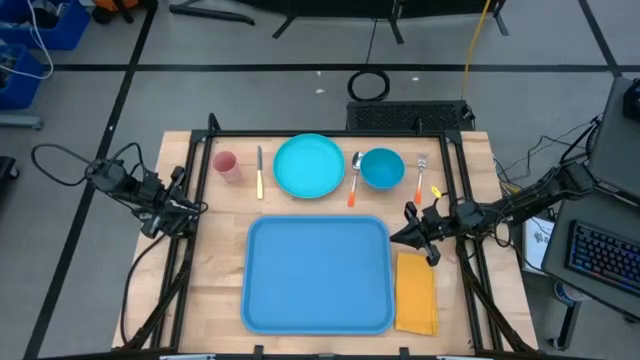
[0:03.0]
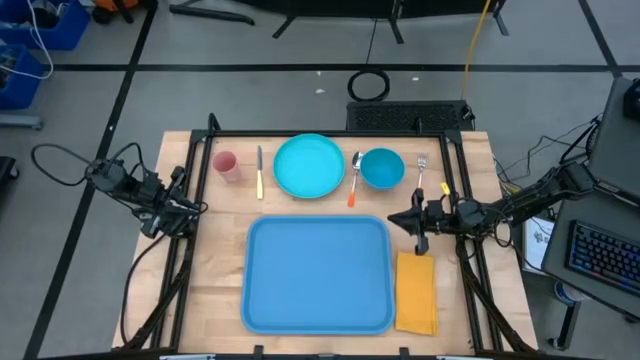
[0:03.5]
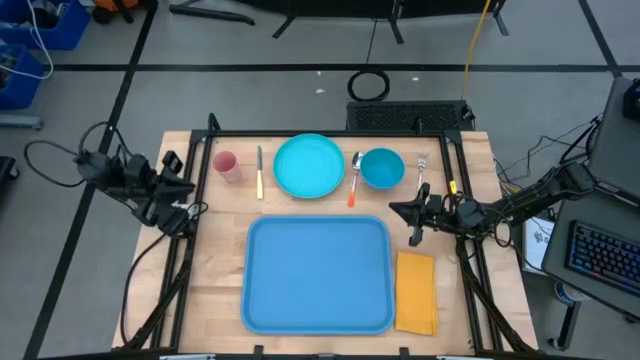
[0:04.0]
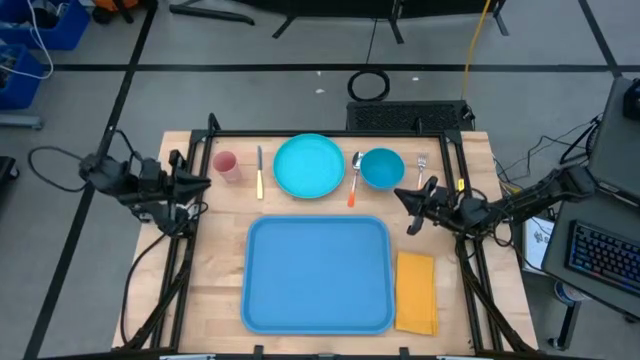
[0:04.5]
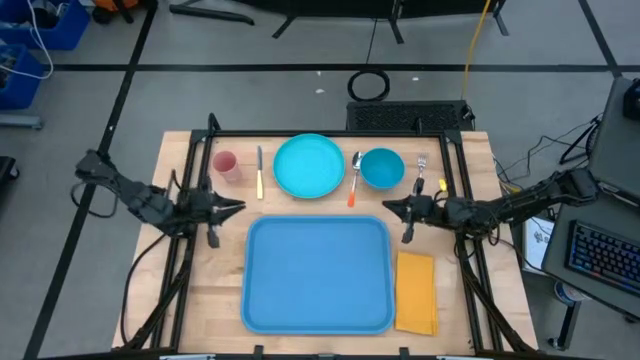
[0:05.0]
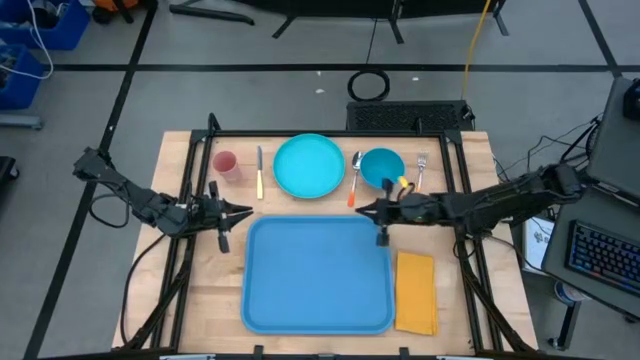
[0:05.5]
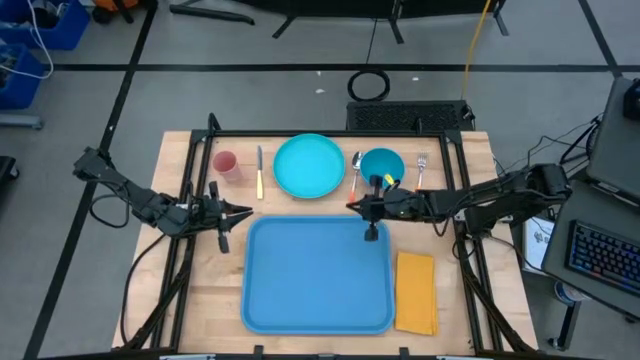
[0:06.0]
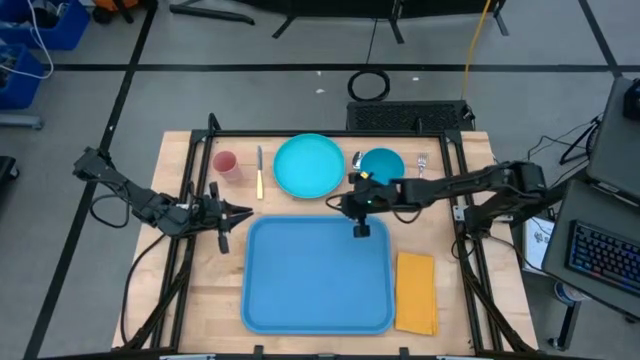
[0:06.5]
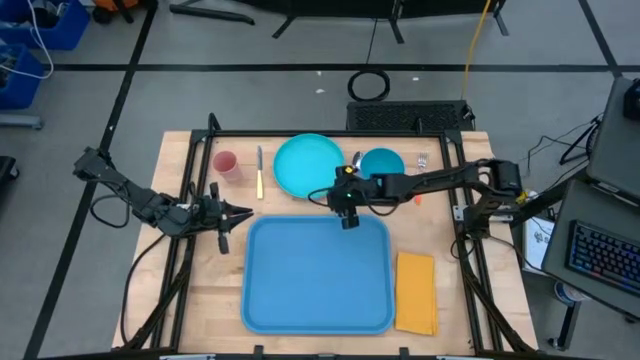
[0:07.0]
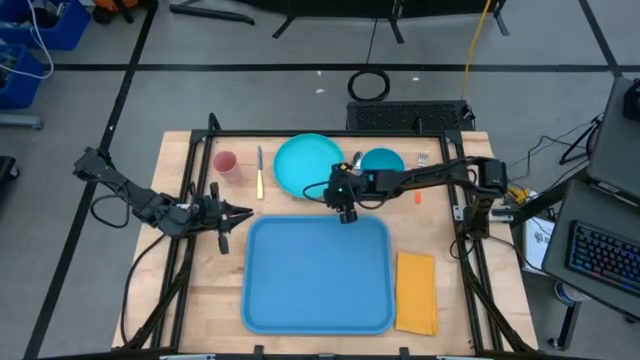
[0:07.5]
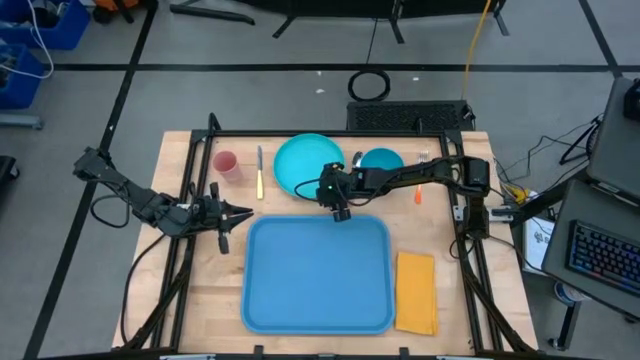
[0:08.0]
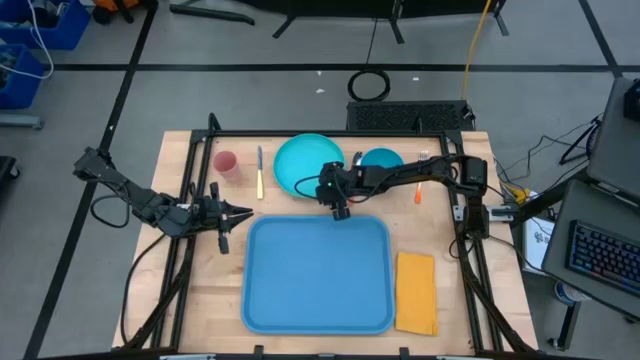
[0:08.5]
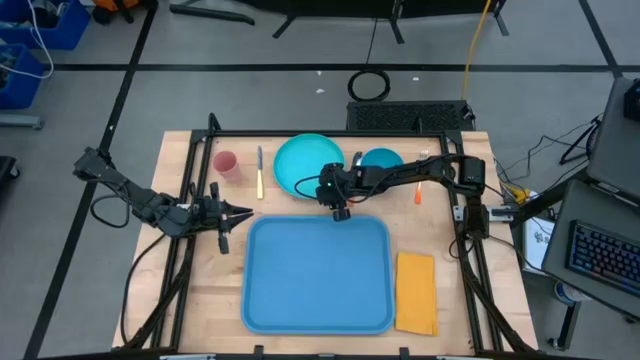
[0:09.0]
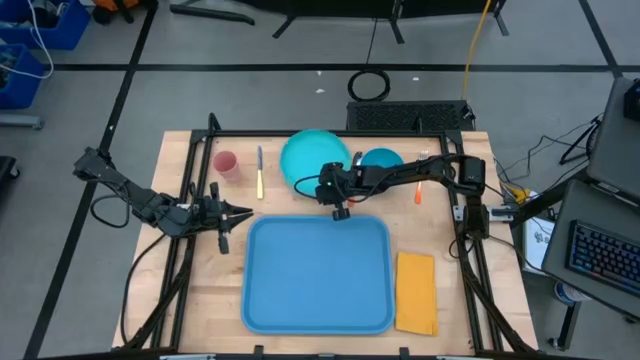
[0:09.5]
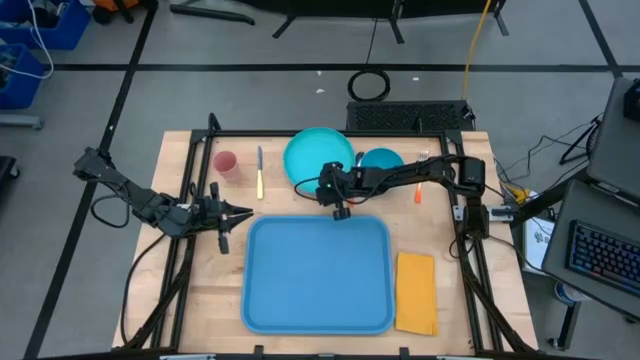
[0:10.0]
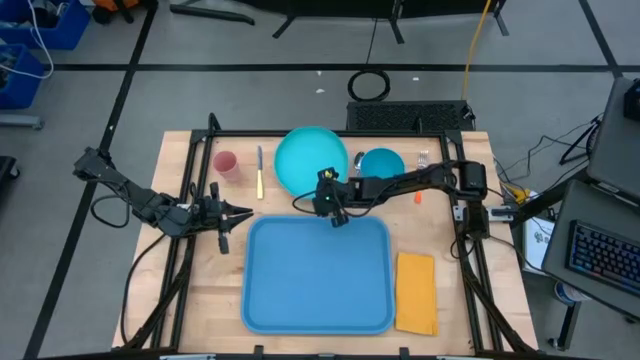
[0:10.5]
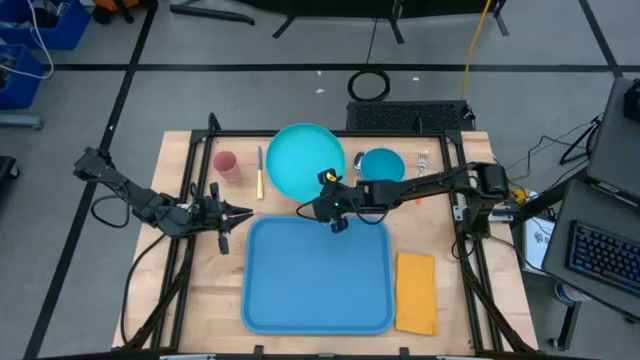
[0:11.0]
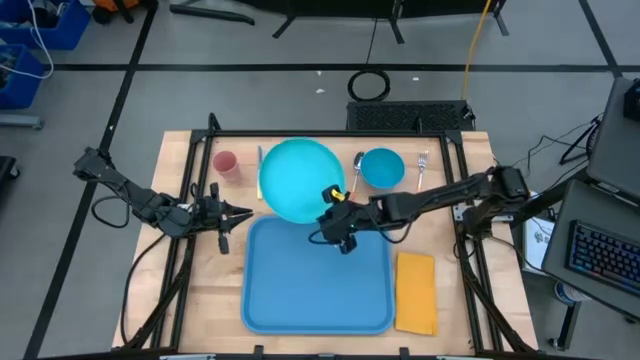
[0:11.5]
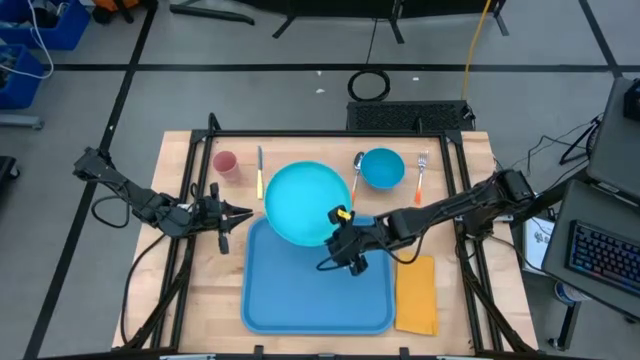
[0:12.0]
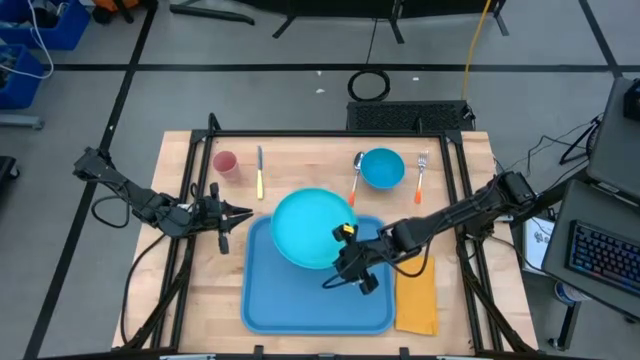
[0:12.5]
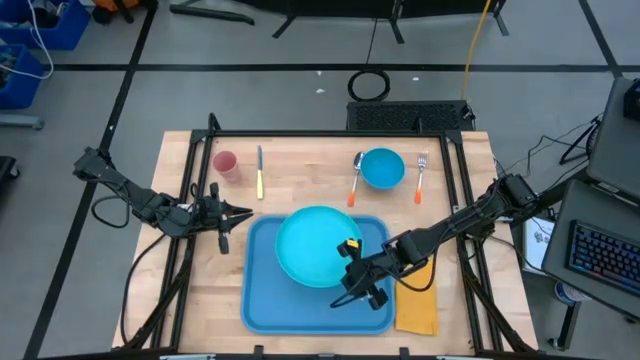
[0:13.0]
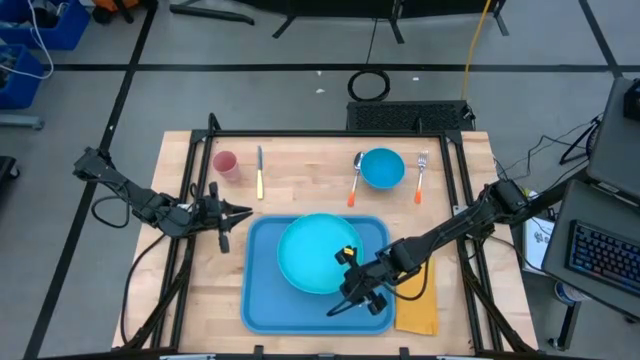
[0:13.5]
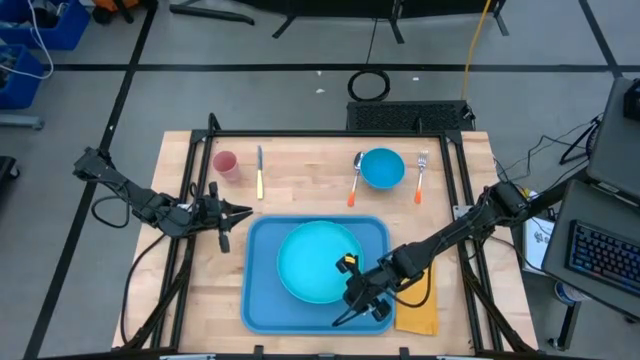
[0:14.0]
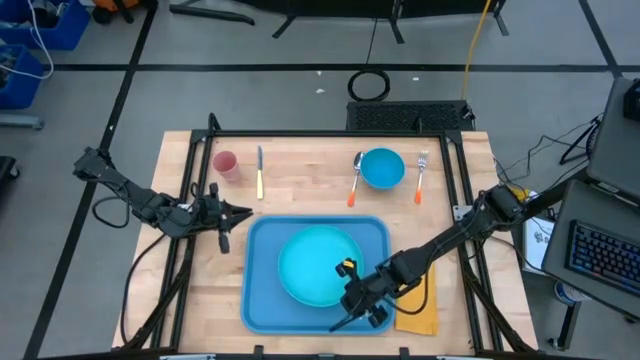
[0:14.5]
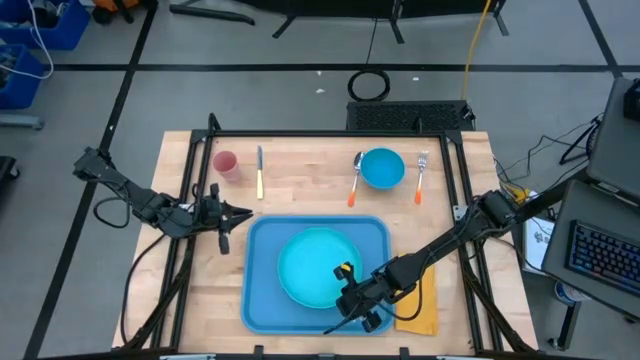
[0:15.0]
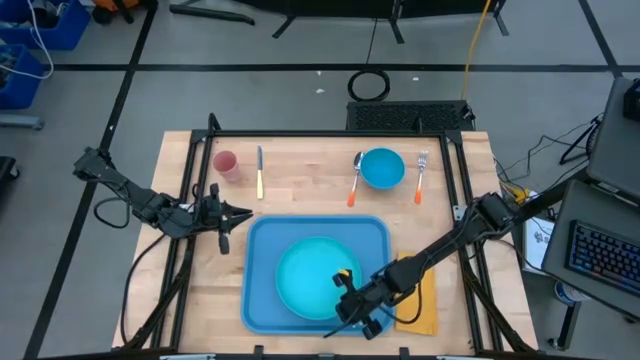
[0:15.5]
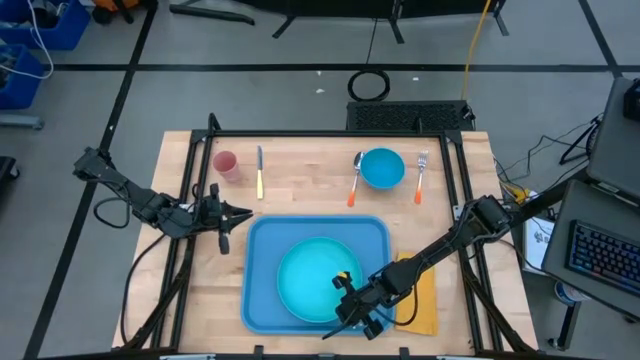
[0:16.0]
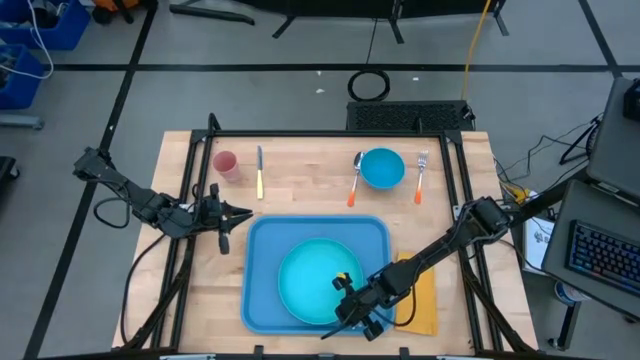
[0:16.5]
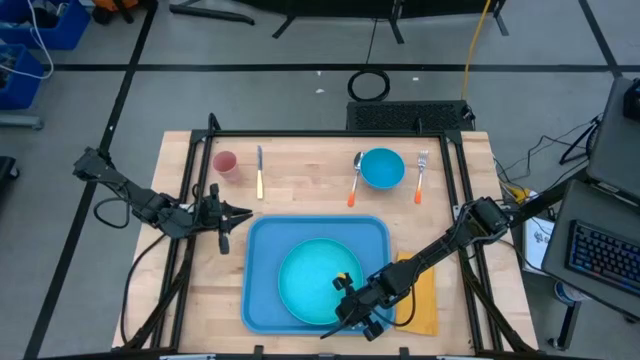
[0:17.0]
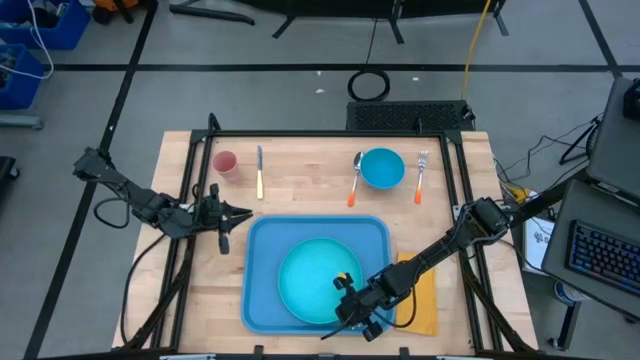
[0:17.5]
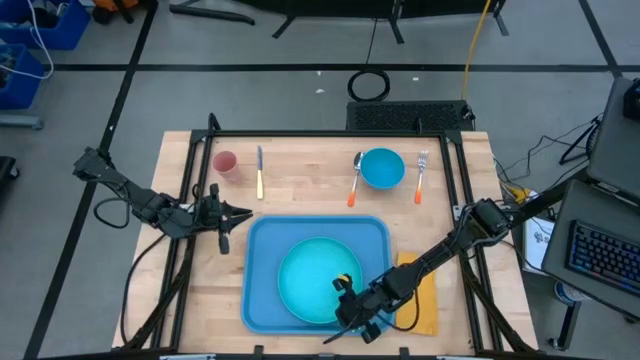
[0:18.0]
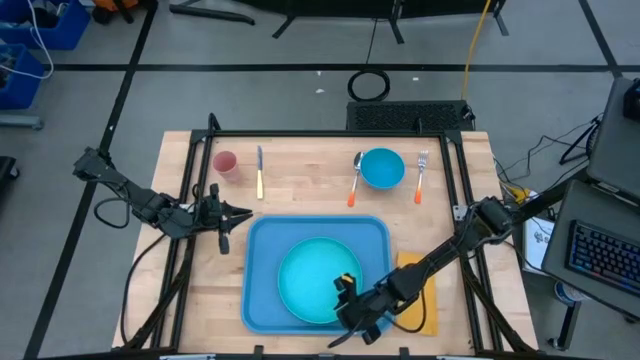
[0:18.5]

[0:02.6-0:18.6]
Task: Set up tray
Put the light blue plate on the blue tray

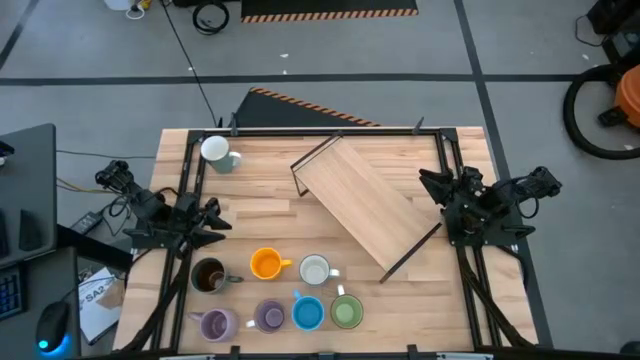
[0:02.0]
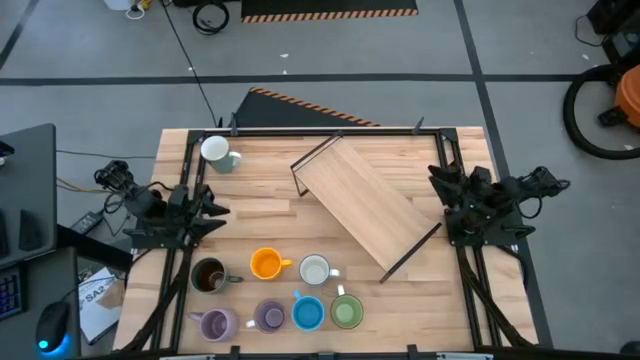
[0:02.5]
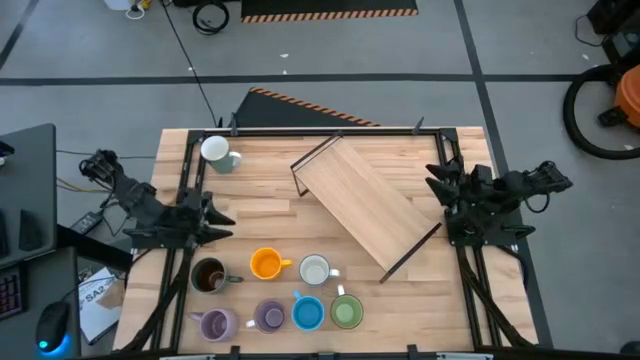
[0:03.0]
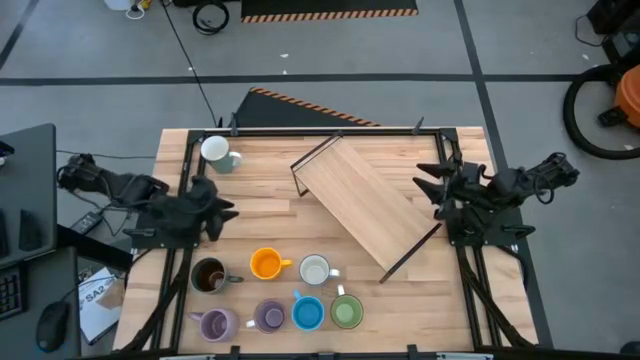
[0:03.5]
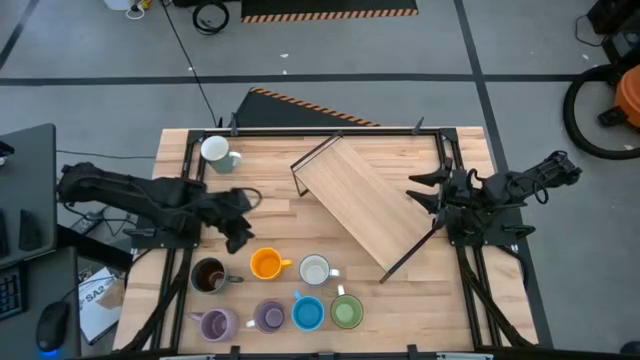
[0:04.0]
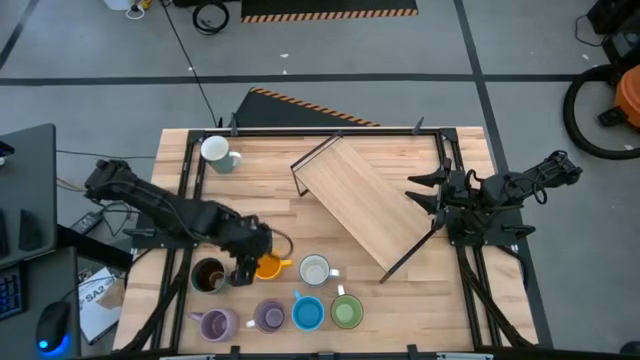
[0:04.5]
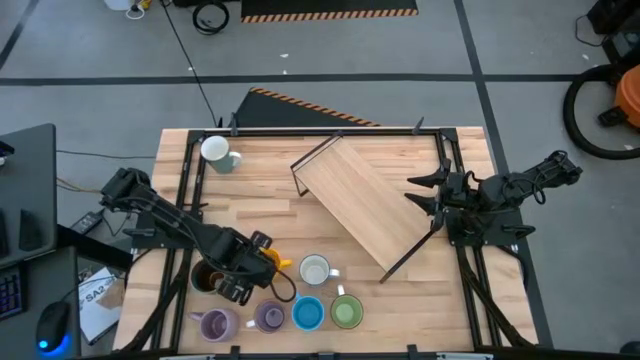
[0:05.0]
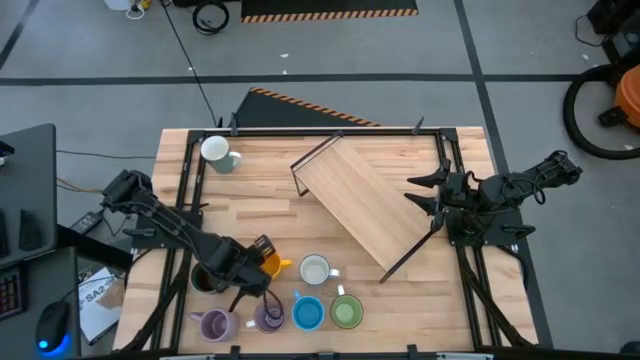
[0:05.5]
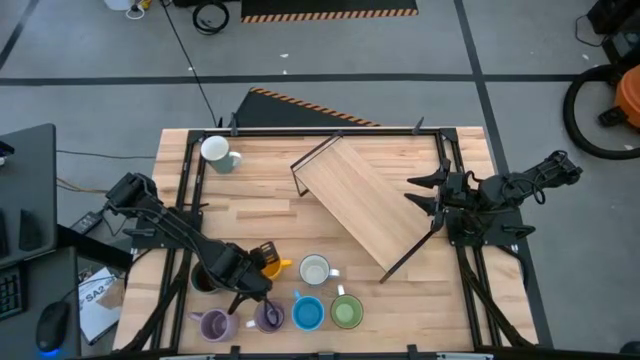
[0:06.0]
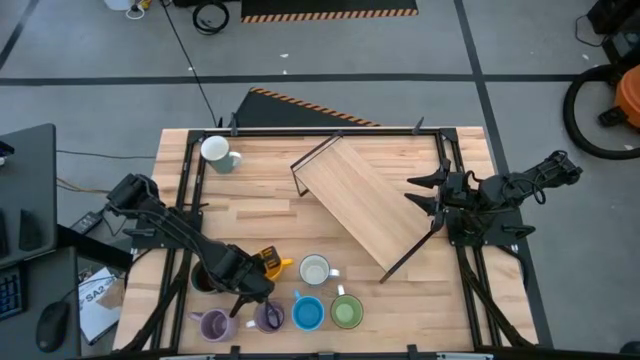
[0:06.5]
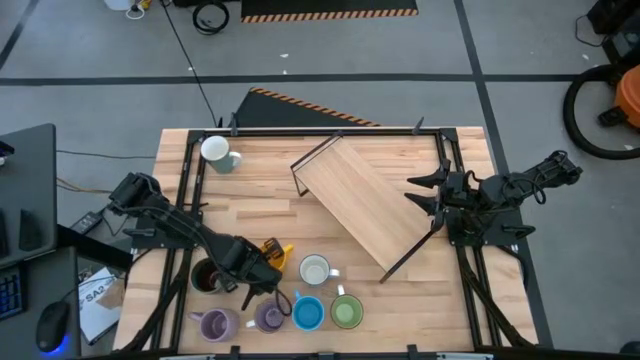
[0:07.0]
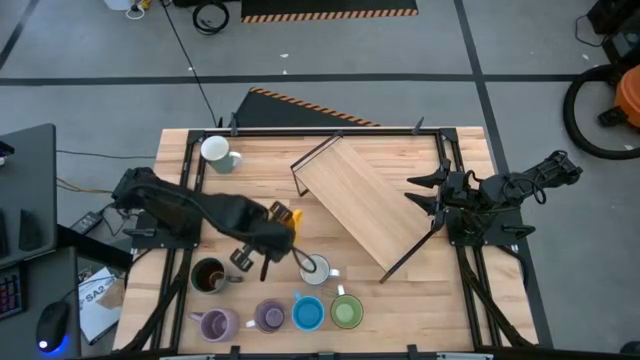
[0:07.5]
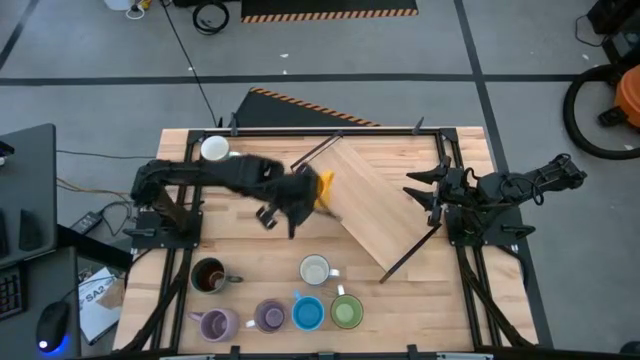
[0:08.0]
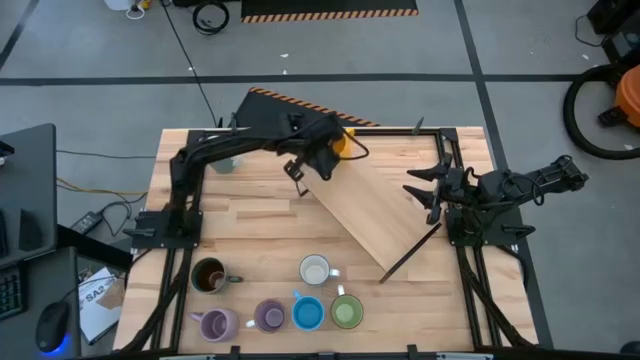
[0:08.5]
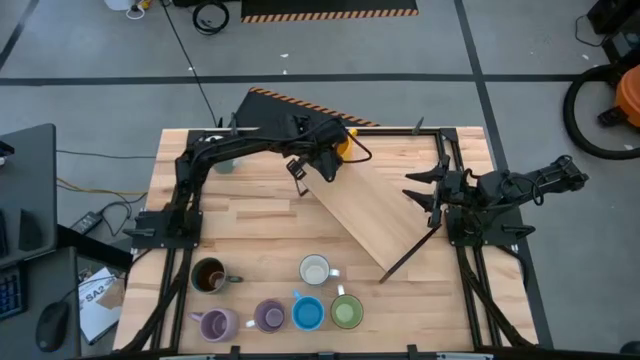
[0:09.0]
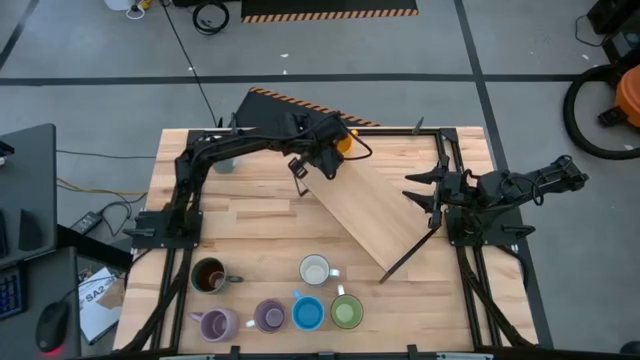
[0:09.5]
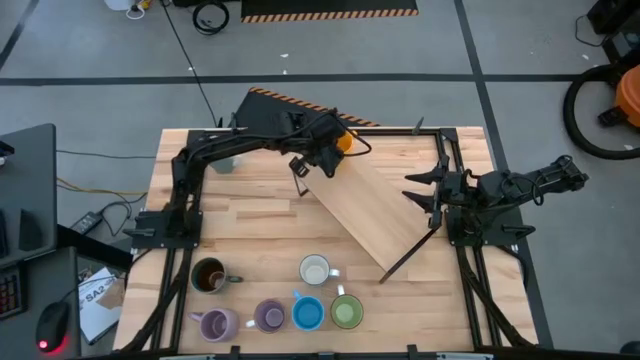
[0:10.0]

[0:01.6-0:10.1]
Task: Place coffee mugs
Put the yellow mug on the shelf
